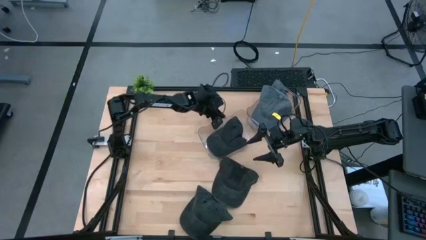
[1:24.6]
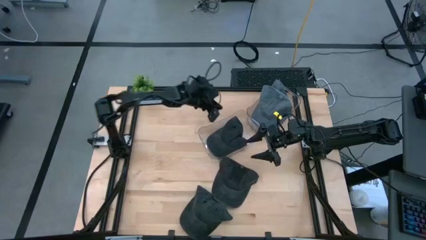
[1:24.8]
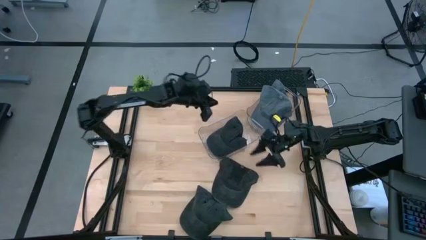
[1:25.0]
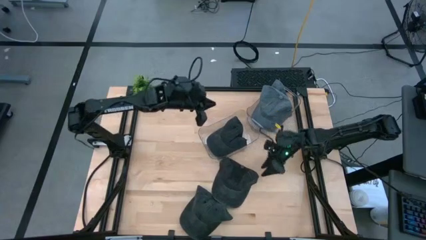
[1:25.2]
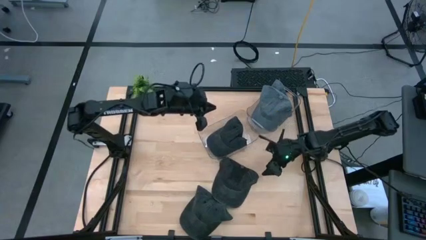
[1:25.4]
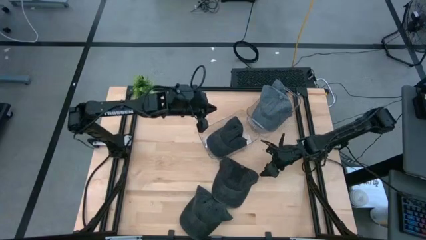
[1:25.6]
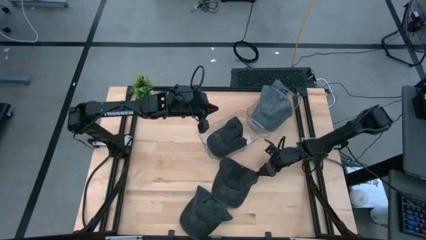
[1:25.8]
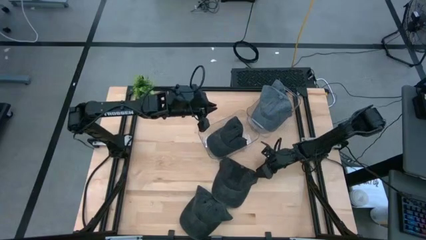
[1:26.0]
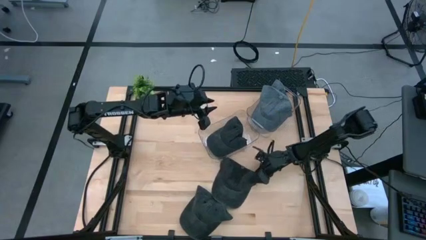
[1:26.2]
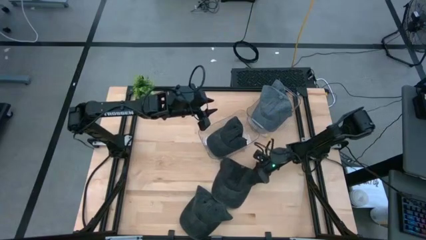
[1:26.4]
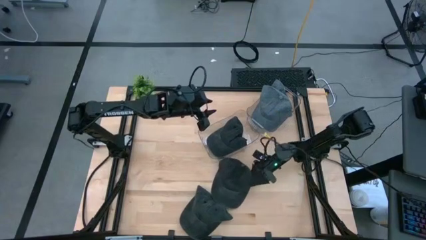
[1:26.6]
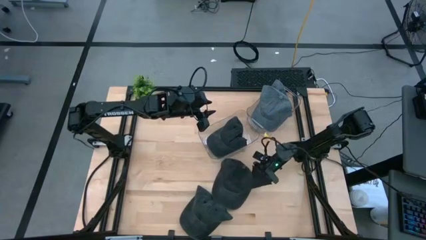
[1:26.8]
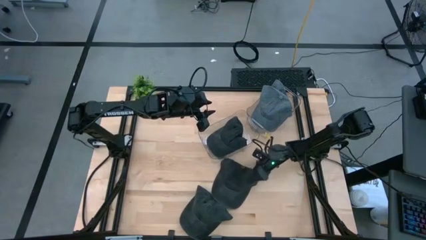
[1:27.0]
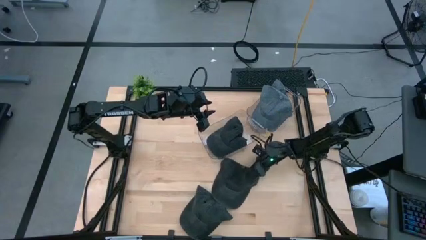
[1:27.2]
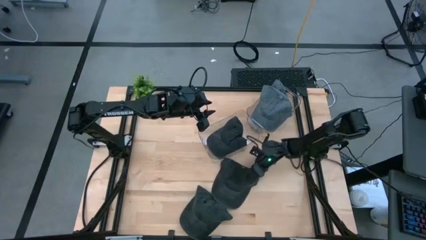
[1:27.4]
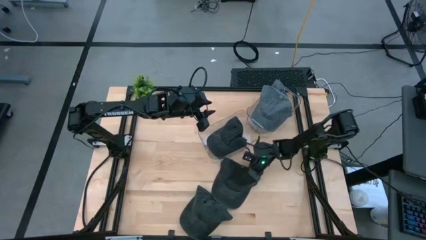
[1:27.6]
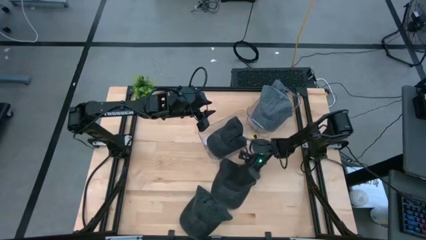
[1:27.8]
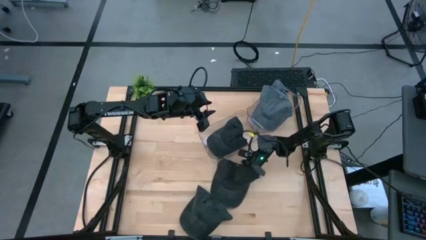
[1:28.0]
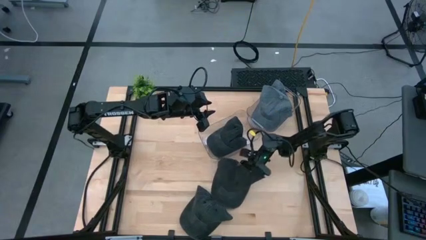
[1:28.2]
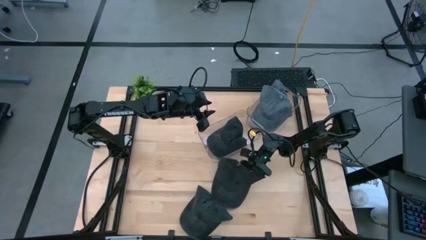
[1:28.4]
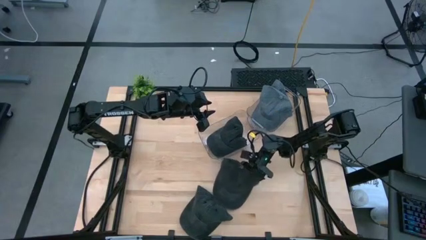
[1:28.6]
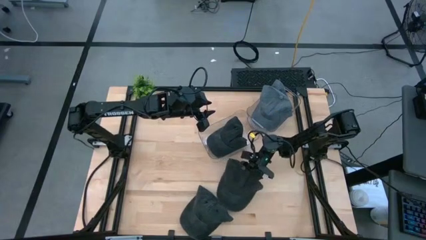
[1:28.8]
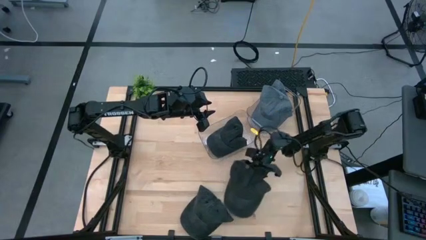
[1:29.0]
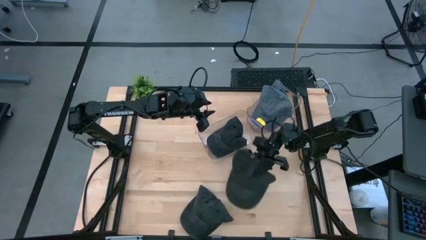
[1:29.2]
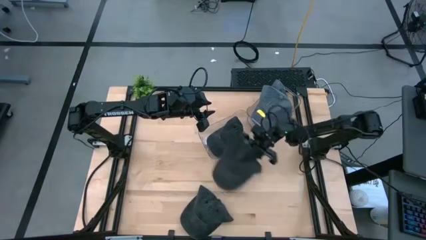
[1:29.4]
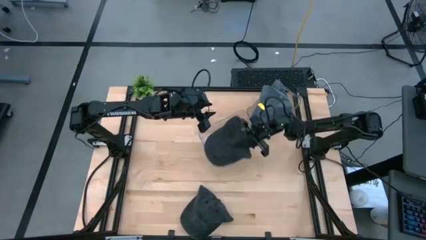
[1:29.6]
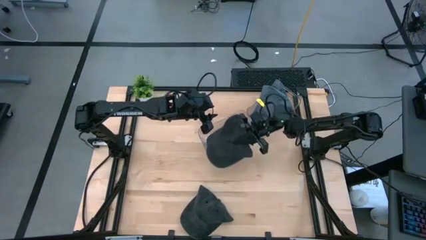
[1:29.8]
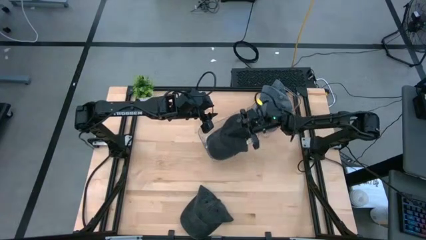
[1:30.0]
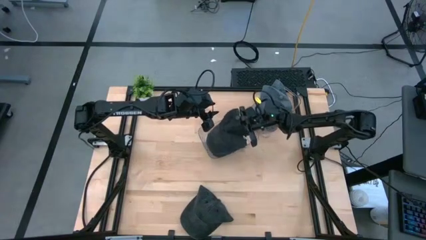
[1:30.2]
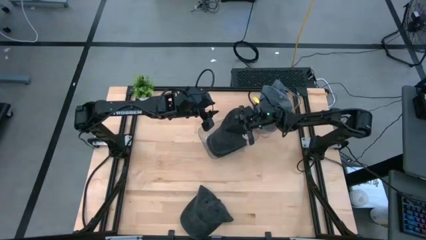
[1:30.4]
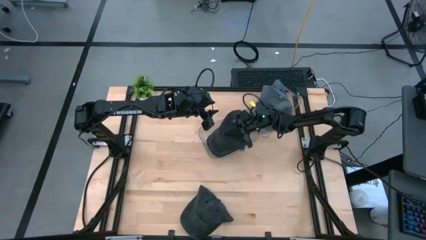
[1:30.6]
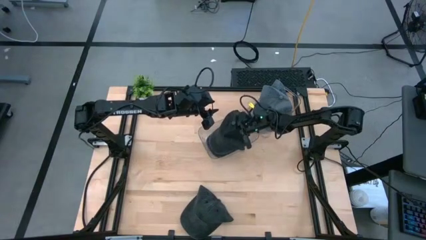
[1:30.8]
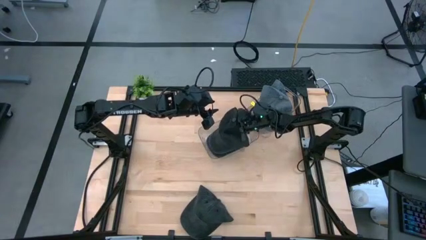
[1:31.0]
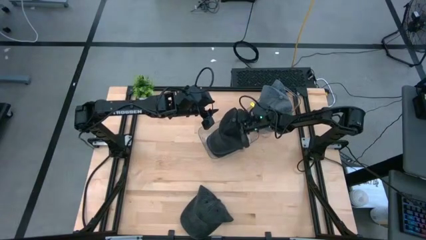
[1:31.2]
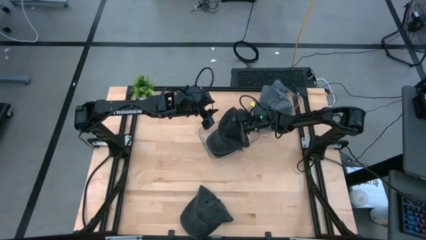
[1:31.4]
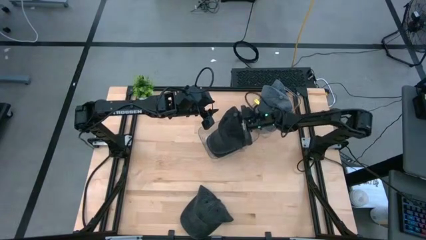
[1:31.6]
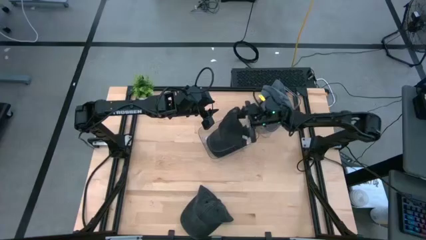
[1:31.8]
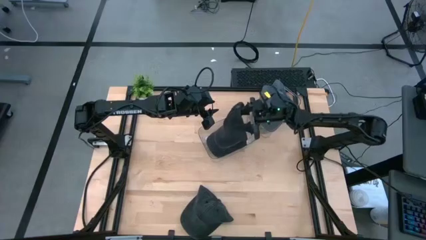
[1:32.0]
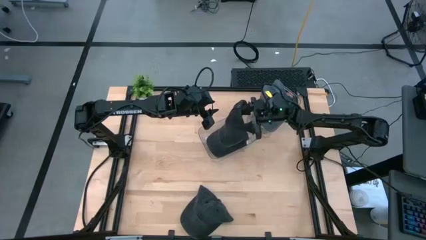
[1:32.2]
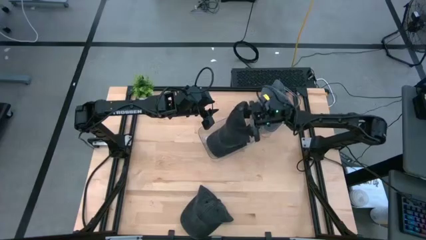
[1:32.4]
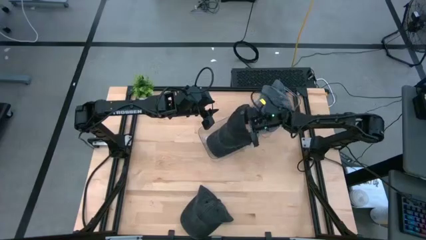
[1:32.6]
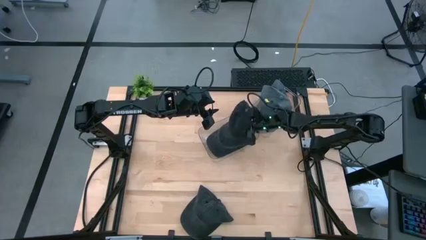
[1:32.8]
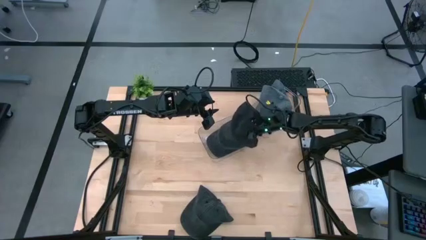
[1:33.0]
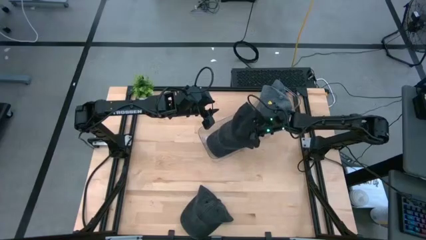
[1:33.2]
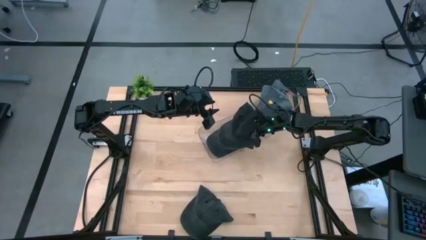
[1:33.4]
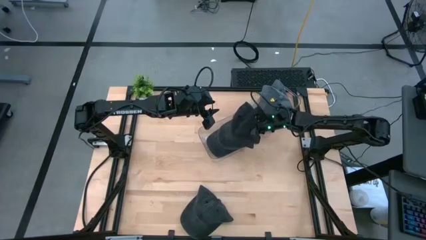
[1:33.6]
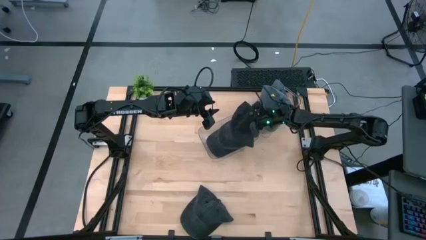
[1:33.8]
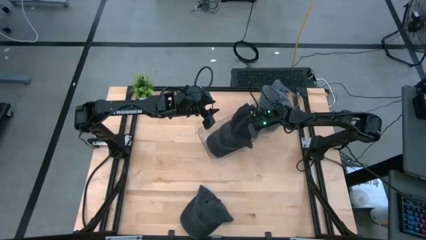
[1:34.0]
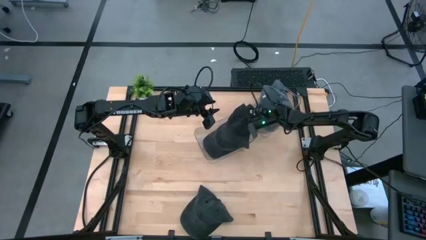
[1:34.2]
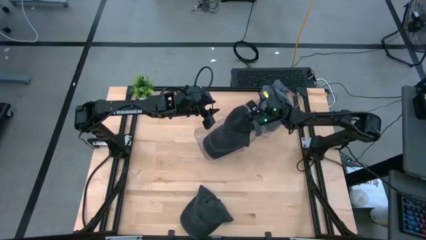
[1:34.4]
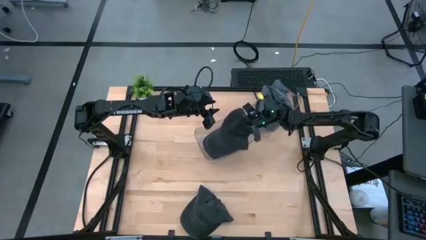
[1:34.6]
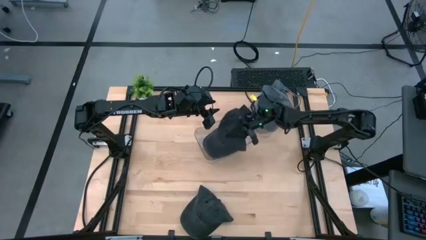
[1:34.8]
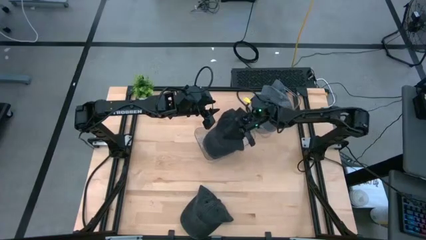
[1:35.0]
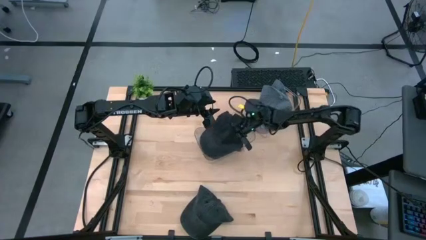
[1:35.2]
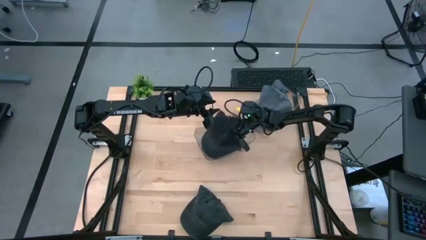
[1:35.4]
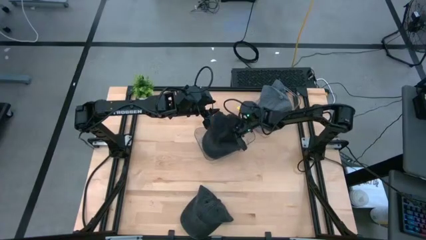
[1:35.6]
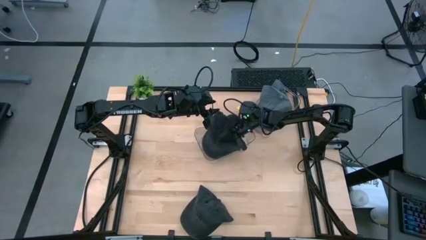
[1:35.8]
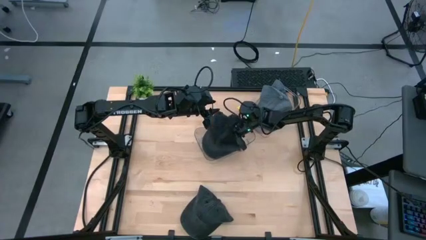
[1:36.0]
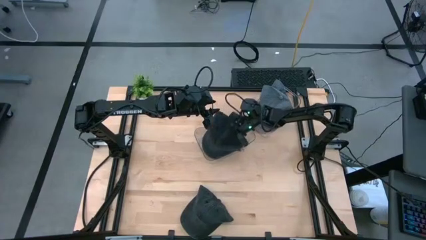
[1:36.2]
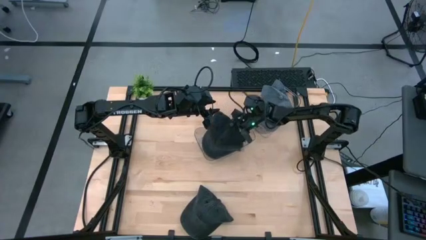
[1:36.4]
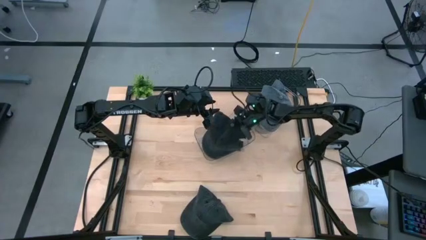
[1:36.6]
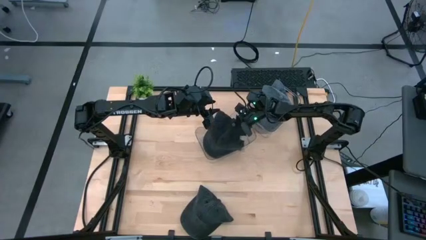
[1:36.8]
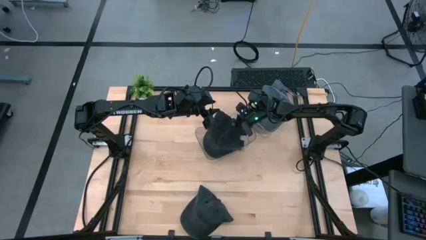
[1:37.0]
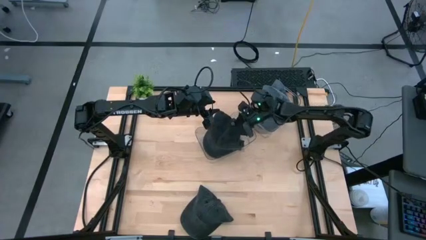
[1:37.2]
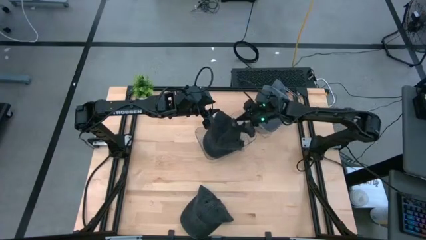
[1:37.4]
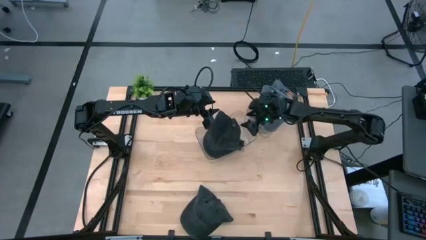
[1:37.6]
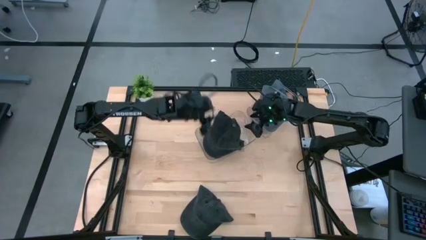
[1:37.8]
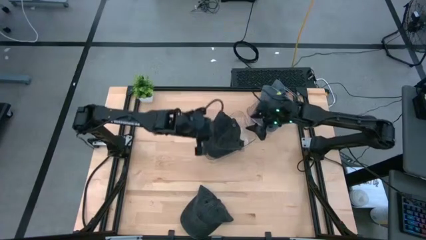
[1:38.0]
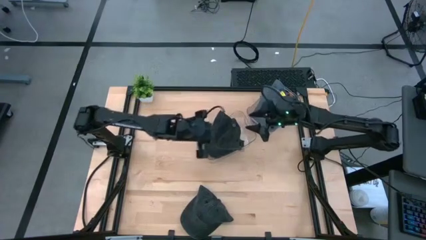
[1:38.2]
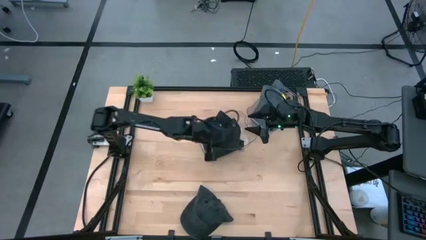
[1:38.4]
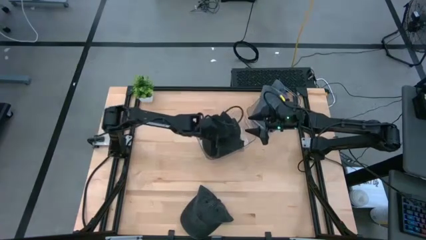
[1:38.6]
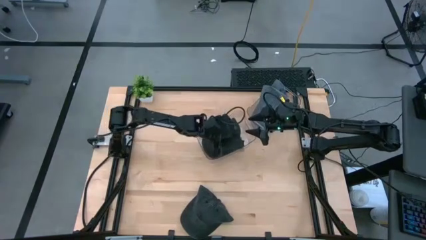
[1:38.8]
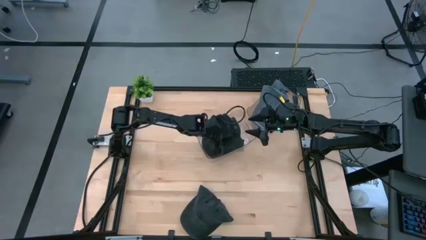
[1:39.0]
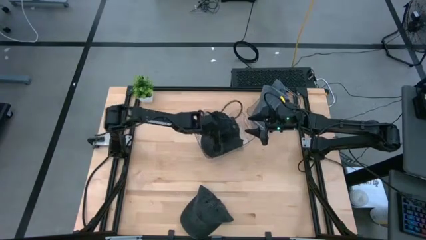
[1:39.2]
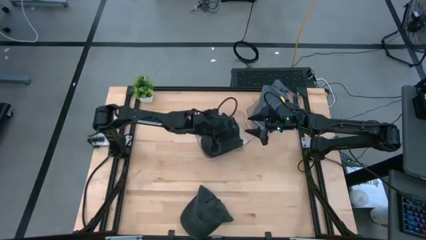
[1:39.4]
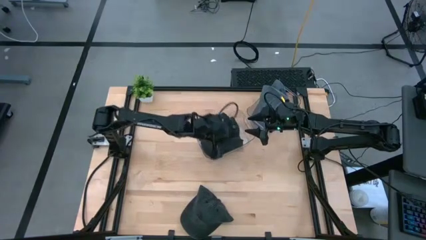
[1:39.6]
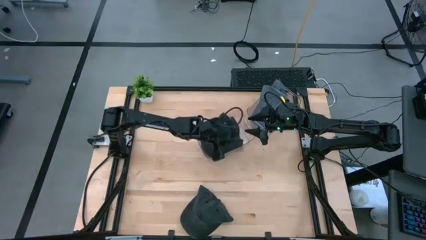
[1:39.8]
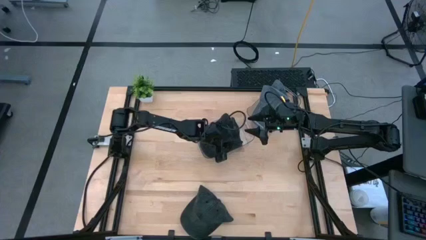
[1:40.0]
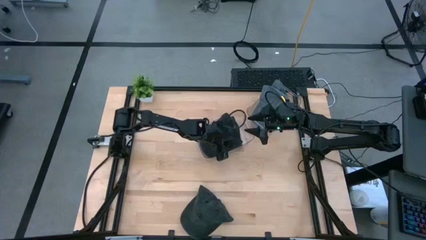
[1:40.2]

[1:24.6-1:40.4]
Task: Pick & Place hat
Stack the top black cap on top of the black cap in the left transparent bin
